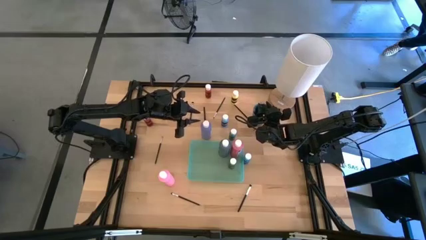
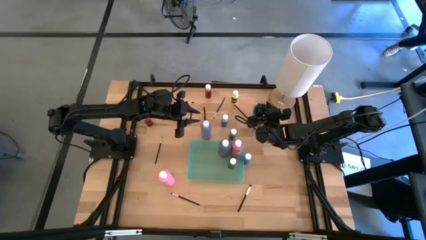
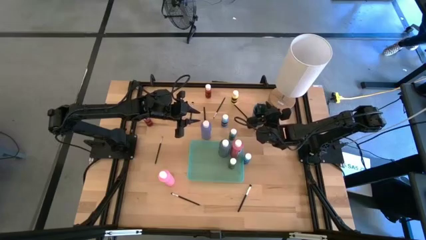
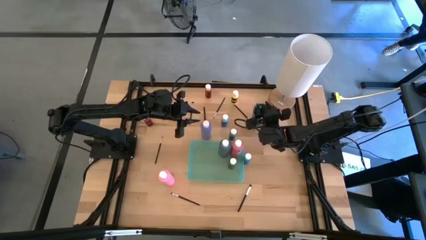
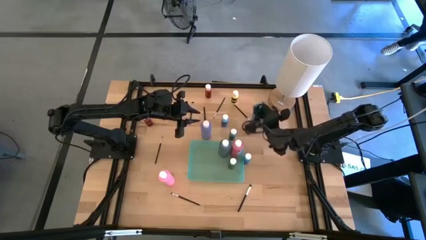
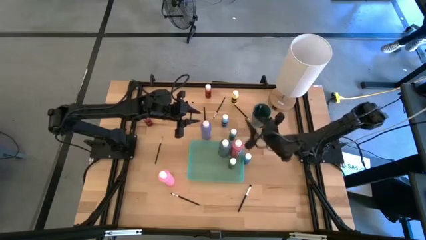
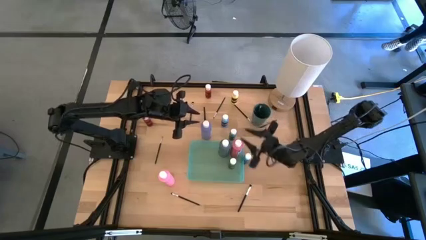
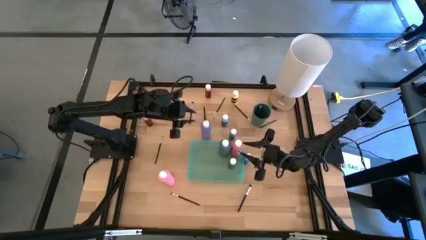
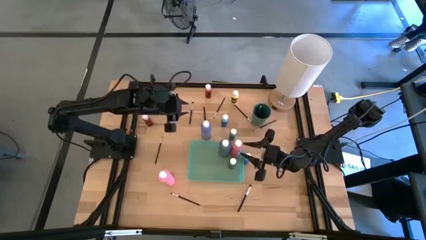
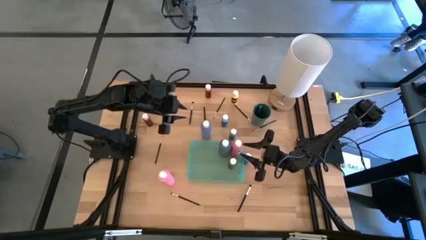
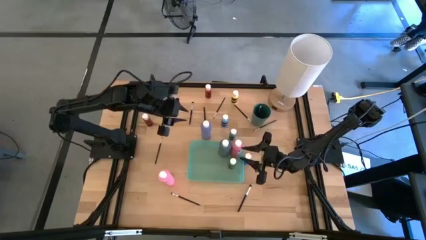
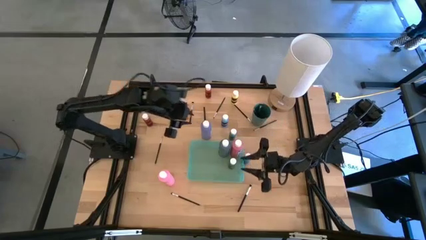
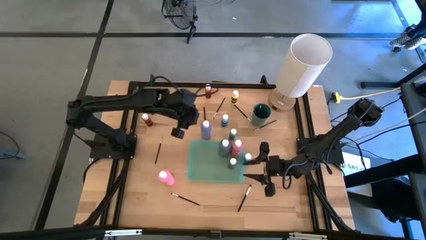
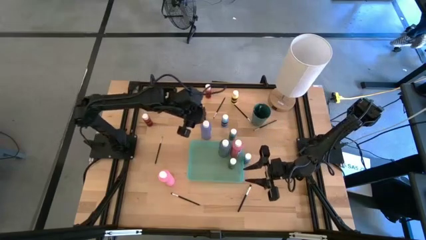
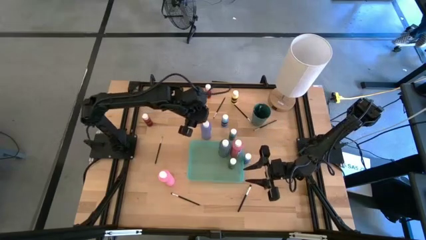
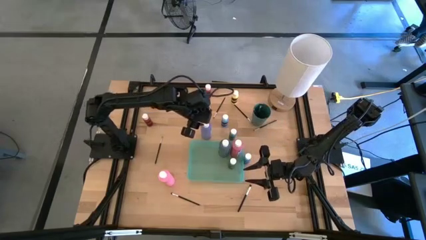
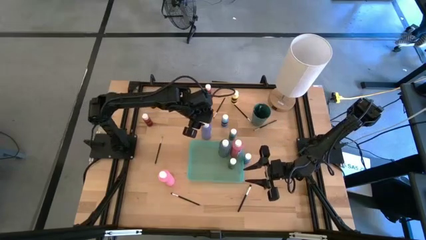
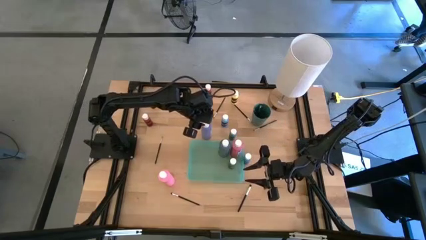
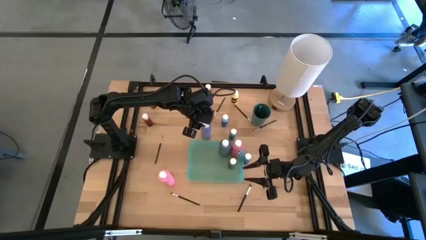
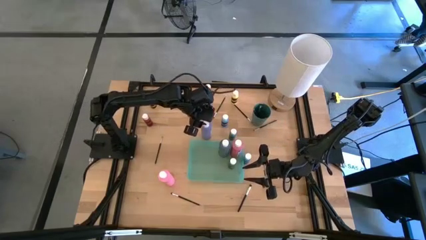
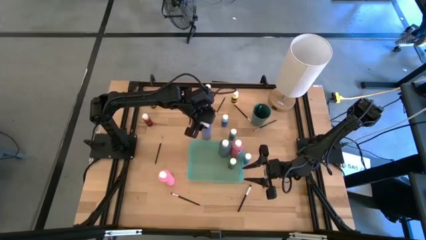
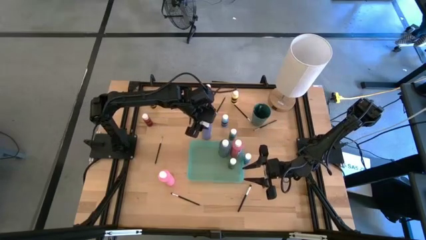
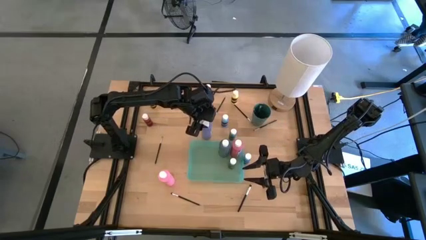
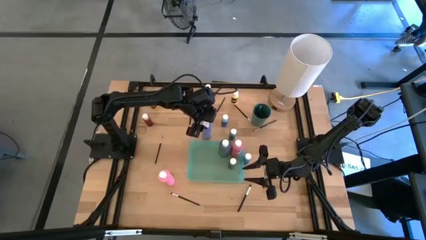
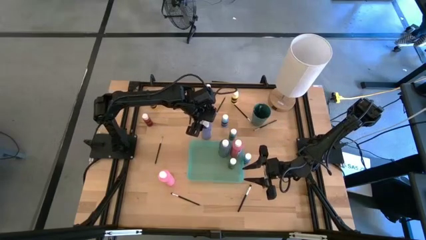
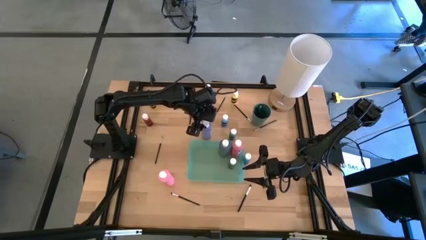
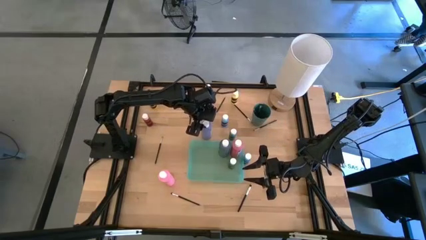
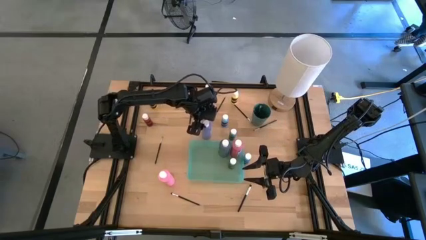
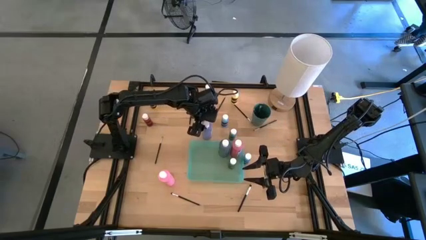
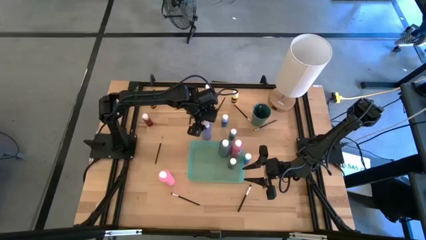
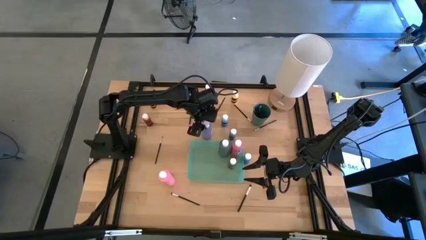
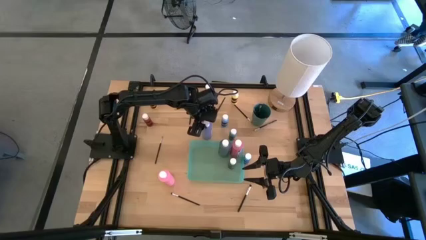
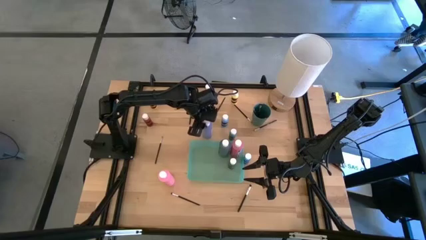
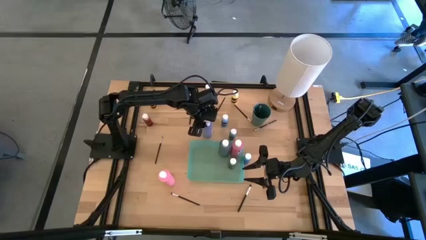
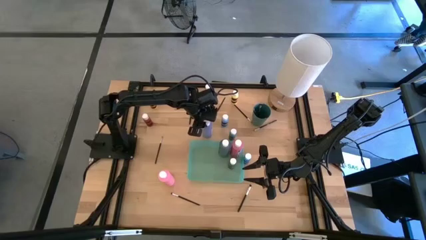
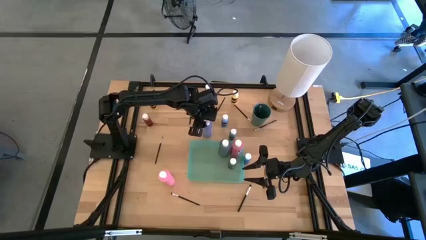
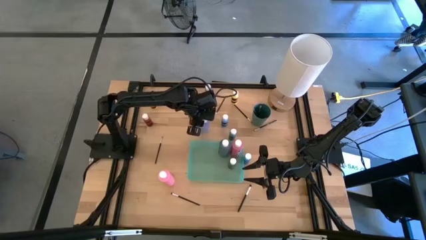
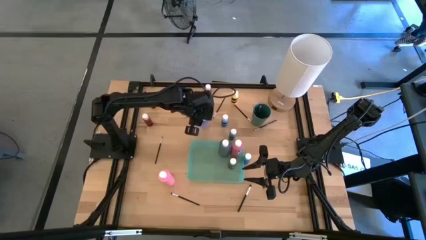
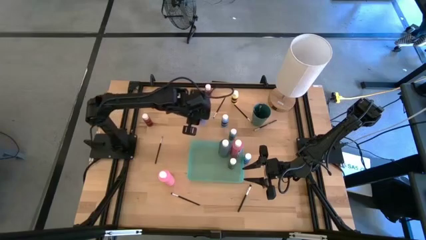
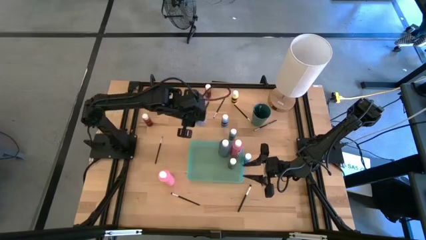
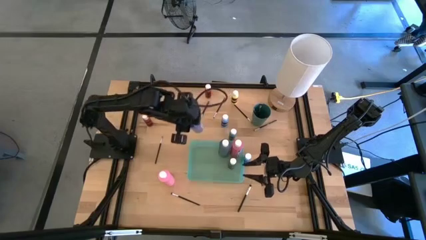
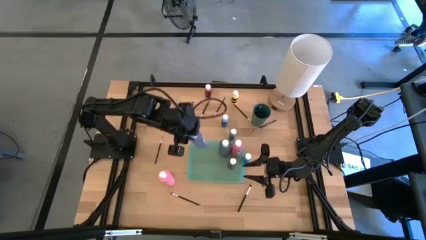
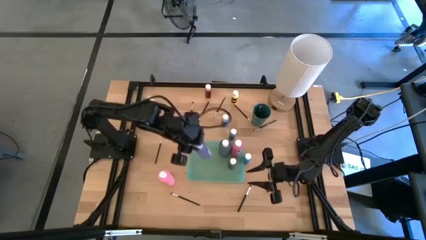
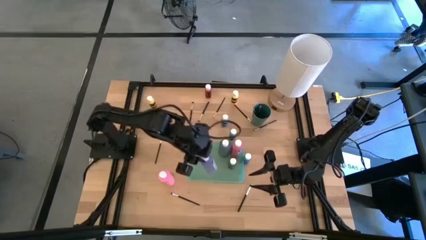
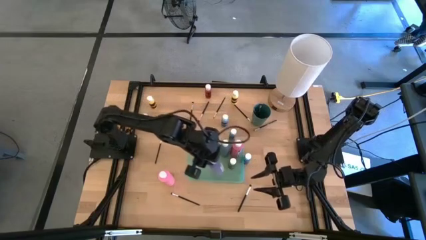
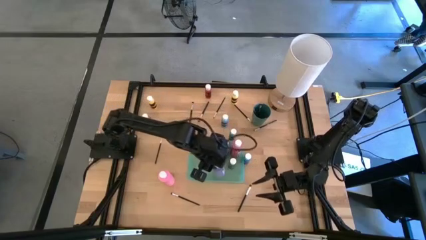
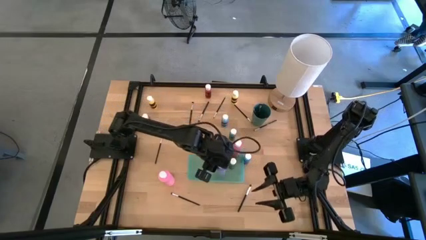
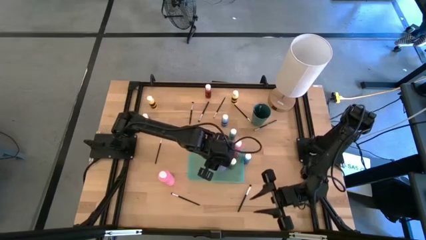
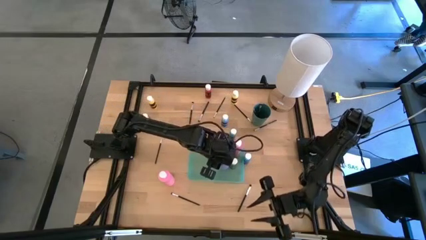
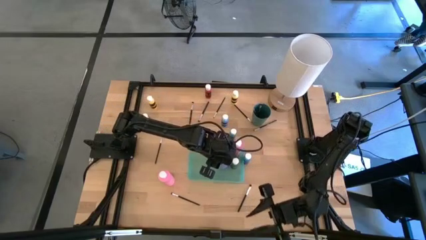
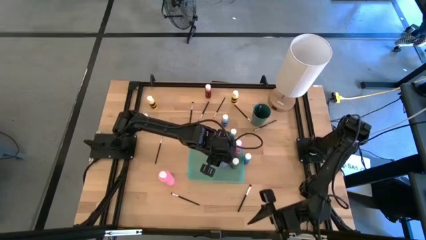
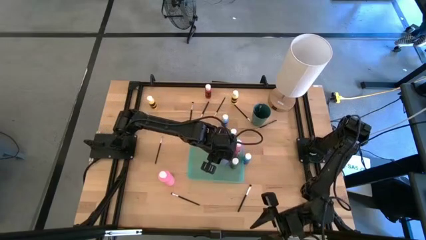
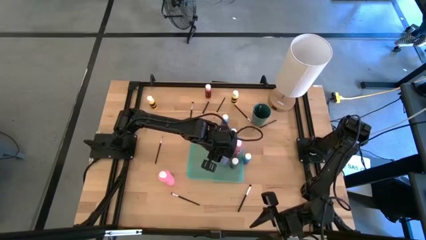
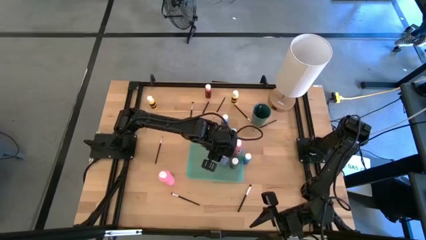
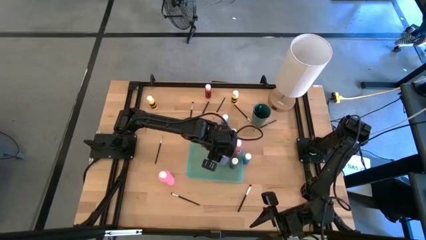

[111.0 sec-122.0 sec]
Task: Pick & Place Paint Supplies
Put the big blue paint bottle into the light green bin
